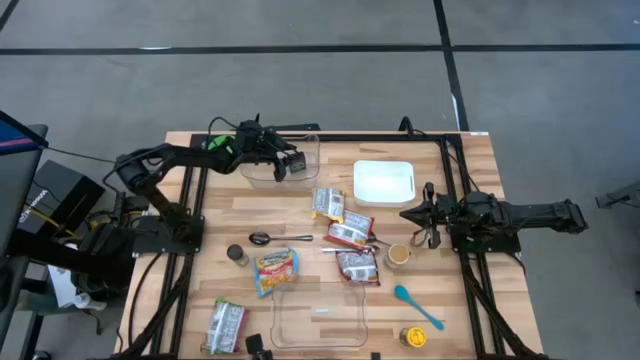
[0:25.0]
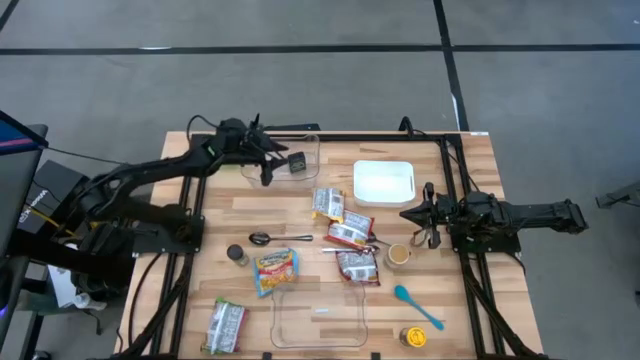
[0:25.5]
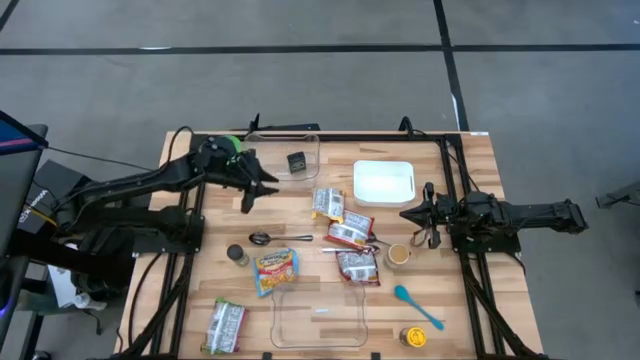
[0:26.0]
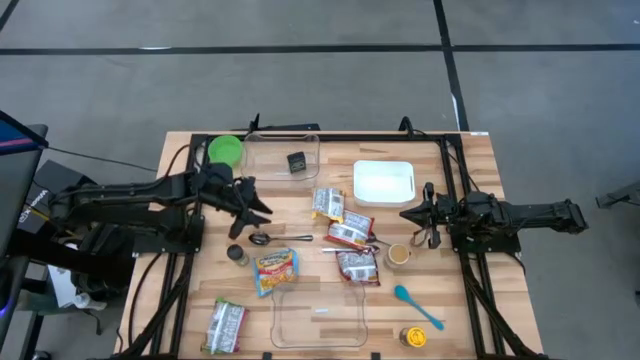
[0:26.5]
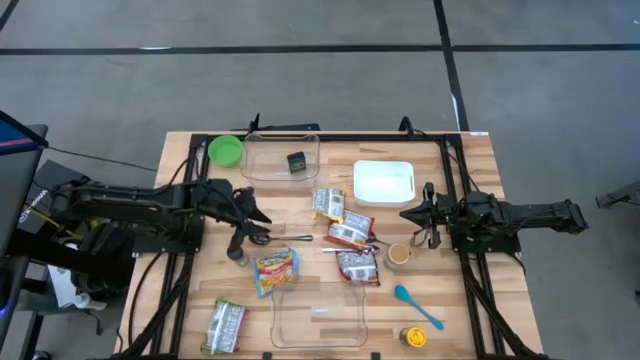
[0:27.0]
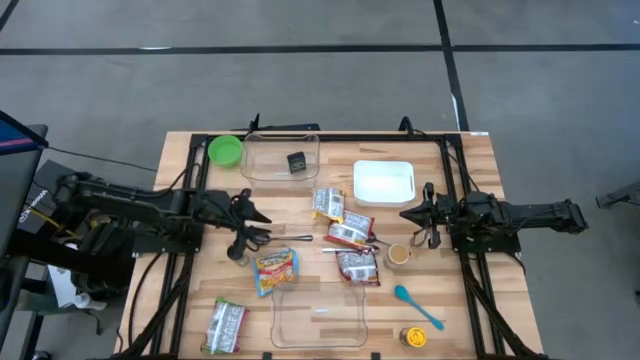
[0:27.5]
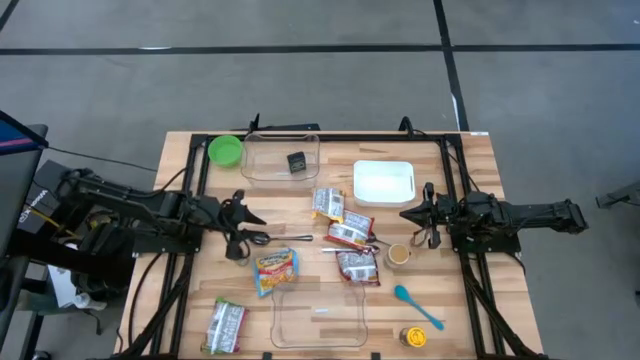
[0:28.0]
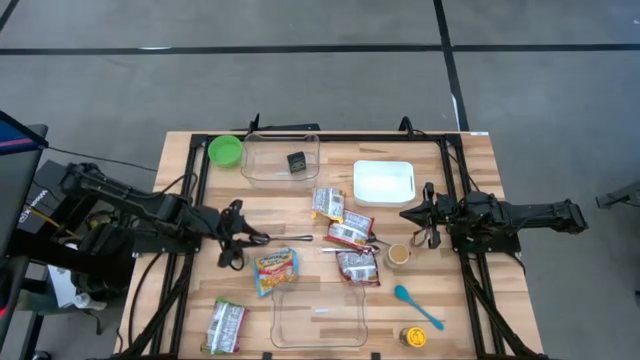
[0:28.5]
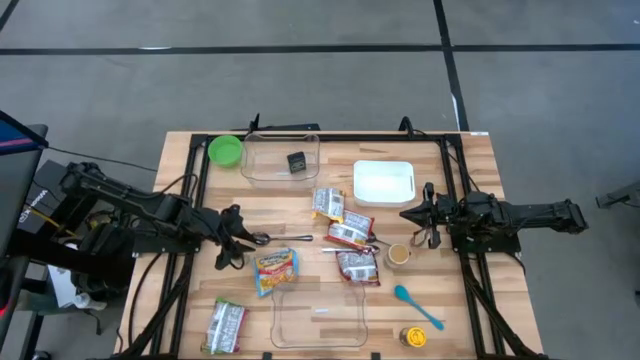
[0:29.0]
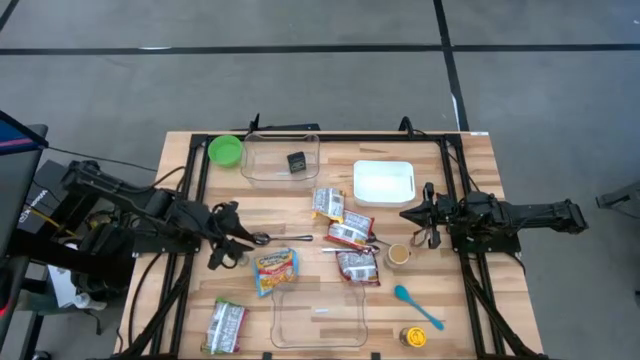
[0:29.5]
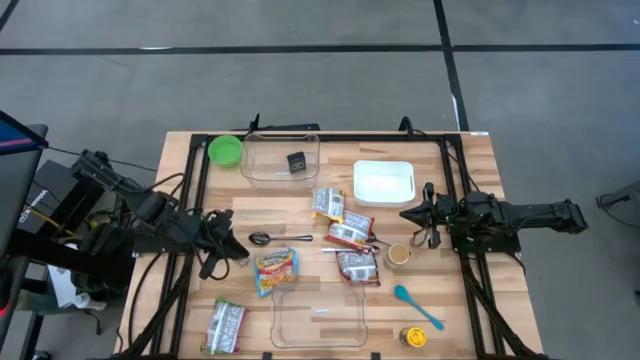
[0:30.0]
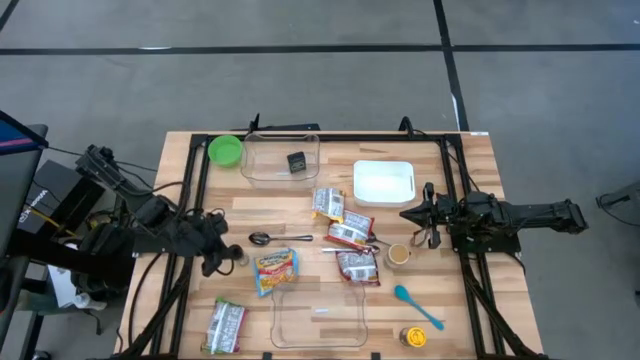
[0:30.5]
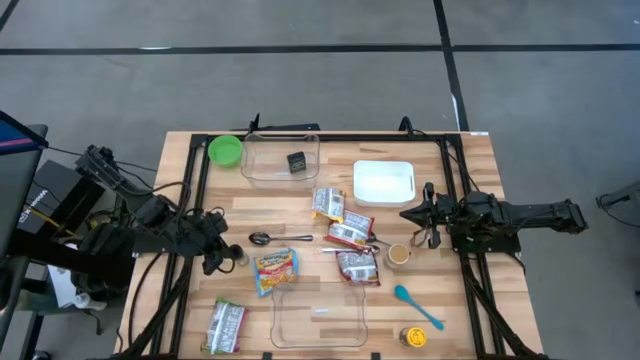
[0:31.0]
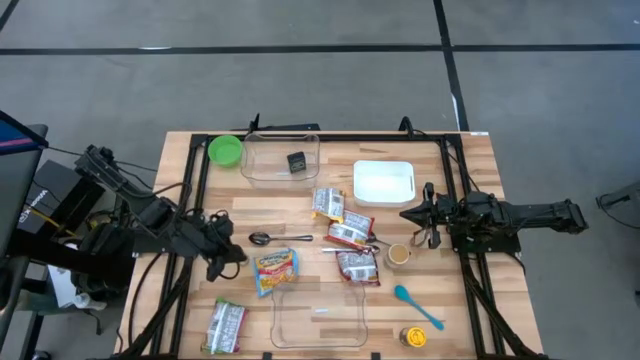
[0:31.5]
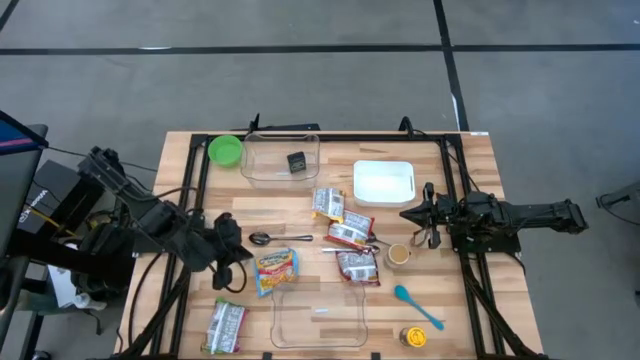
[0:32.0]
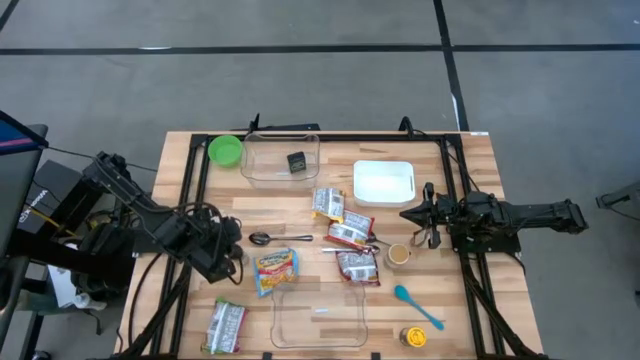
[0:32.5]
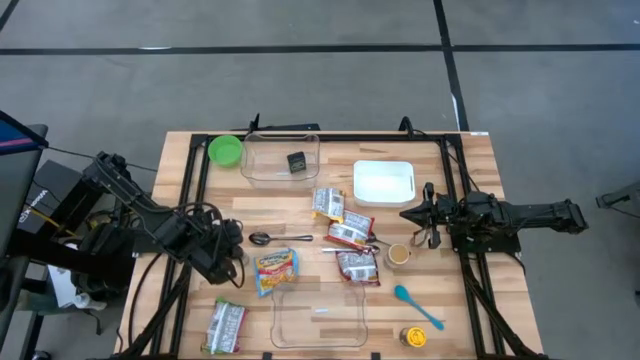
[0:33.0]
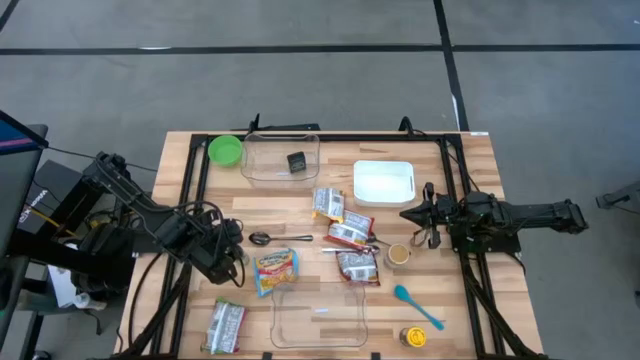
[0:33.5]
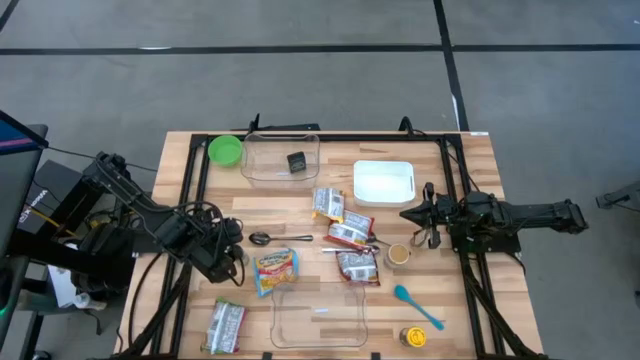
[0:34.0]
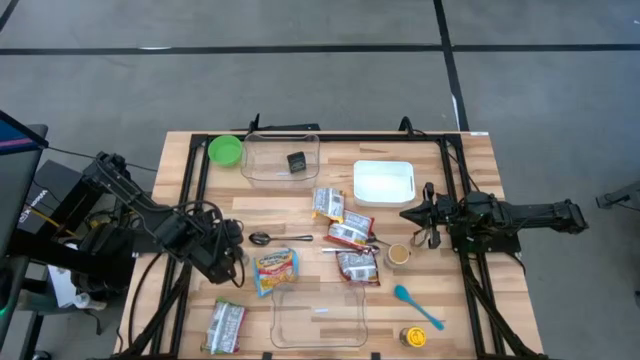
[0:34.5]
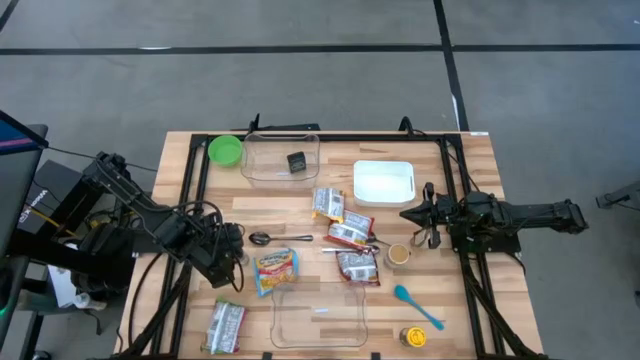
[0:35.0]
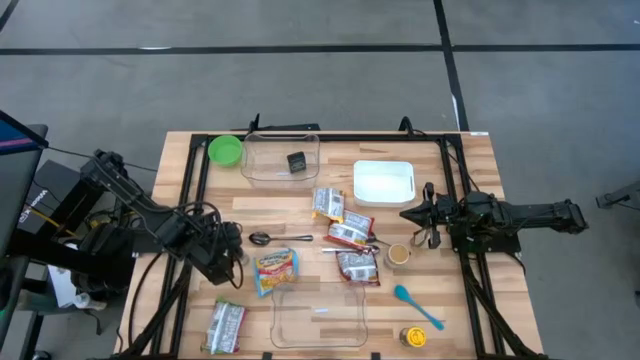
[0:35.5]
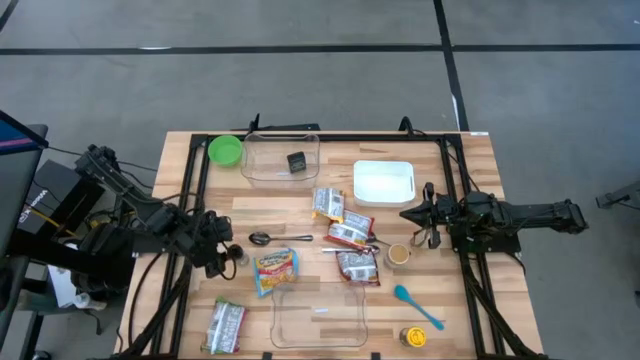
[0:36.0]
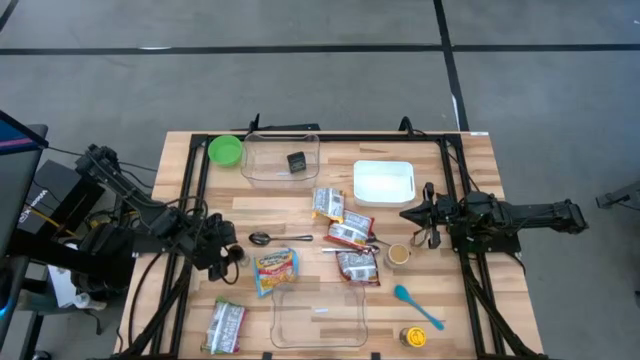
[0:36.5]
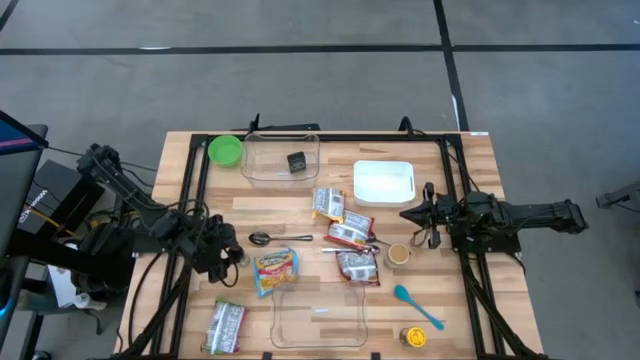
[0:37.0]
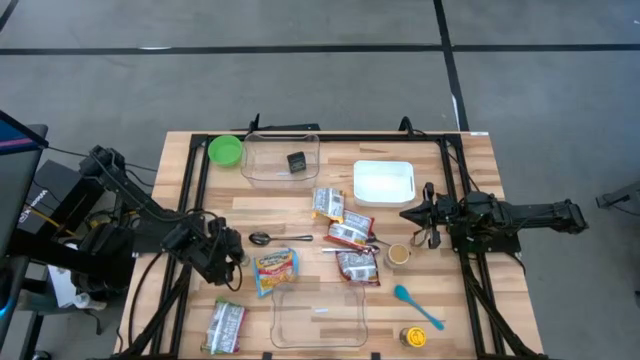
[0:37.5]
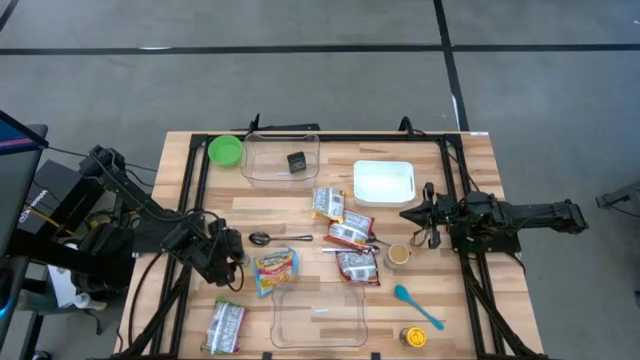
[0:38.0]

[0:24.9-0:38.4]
Task: Pick & Place Food Item
Put the green seasoning bottle into the top transparent bin

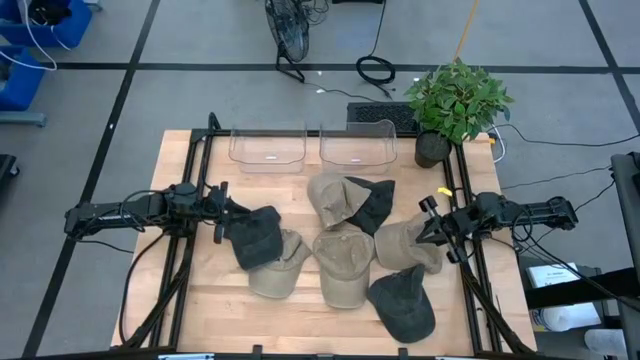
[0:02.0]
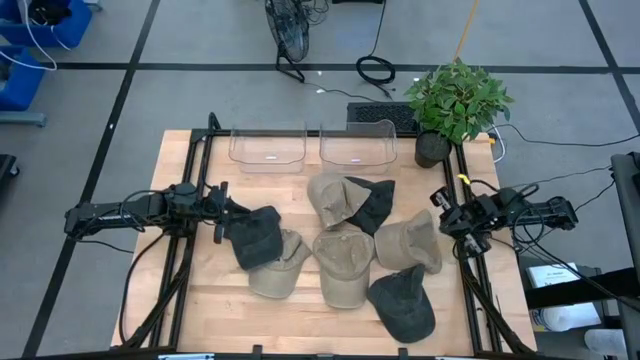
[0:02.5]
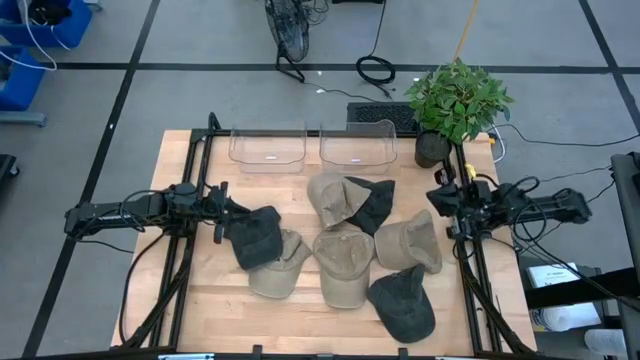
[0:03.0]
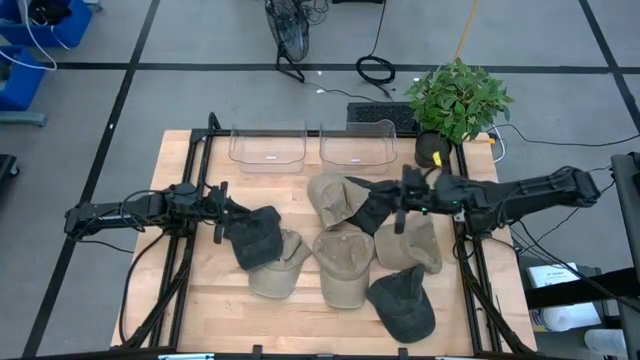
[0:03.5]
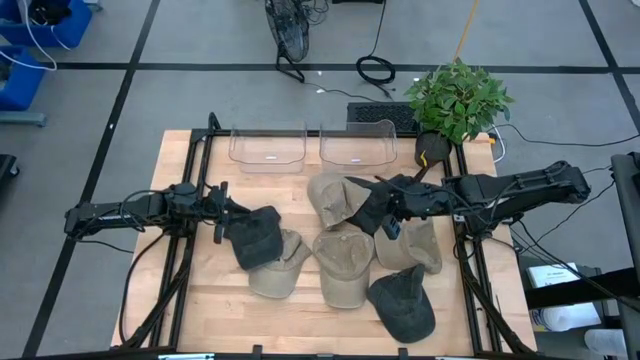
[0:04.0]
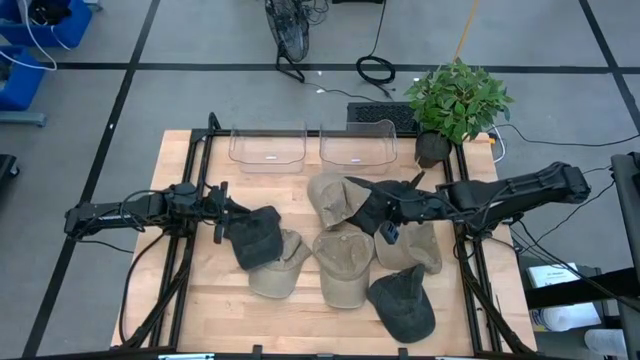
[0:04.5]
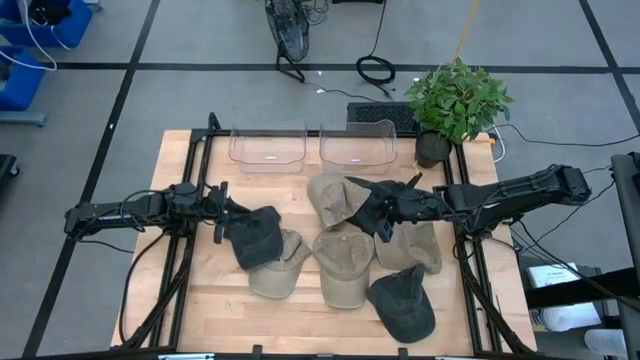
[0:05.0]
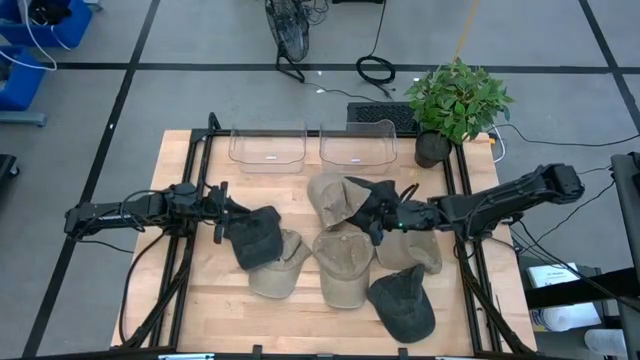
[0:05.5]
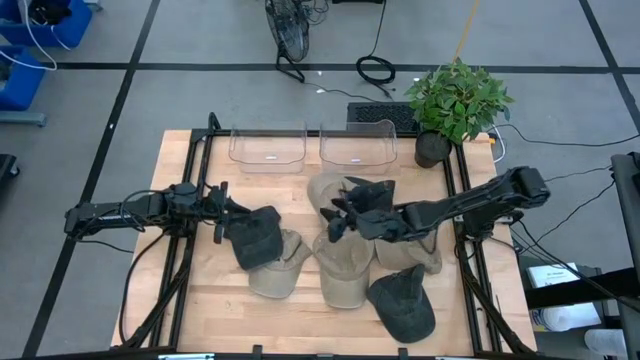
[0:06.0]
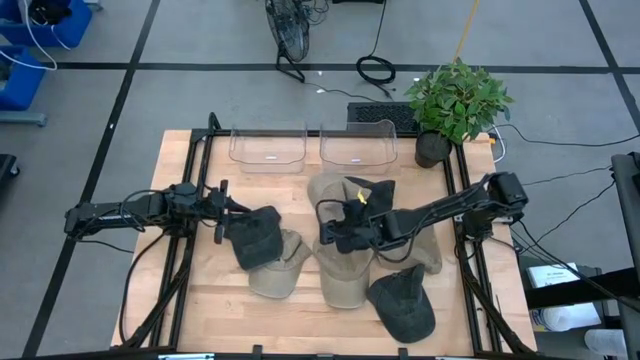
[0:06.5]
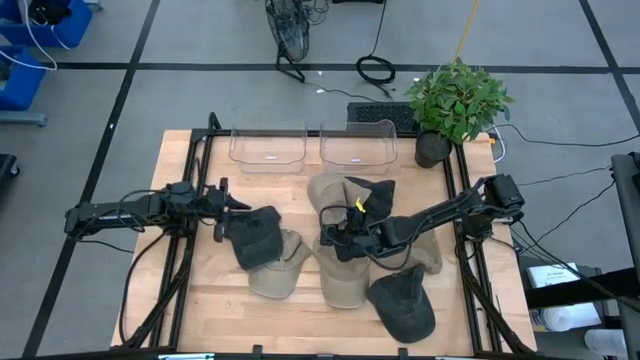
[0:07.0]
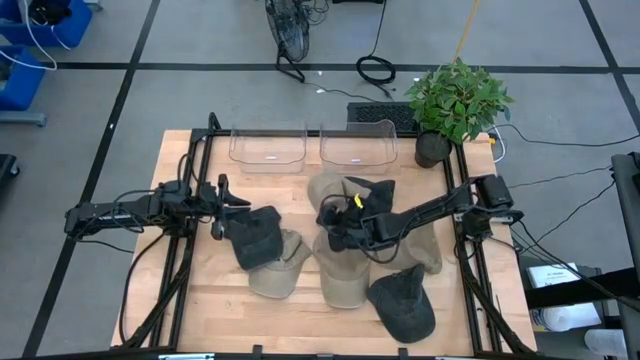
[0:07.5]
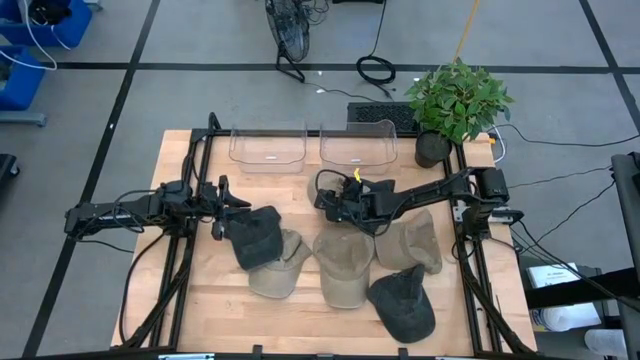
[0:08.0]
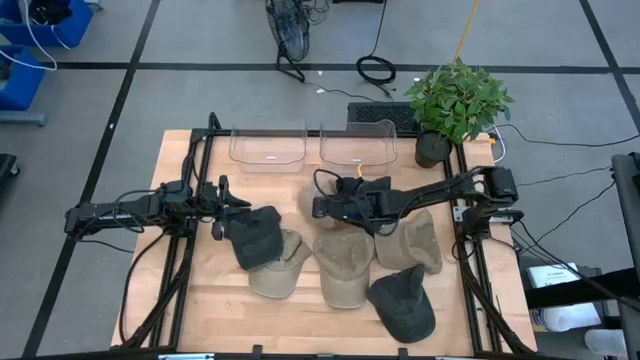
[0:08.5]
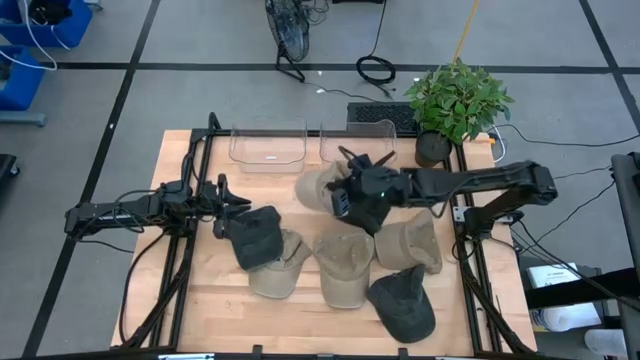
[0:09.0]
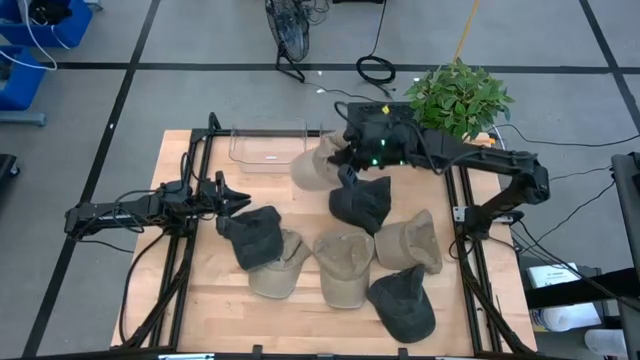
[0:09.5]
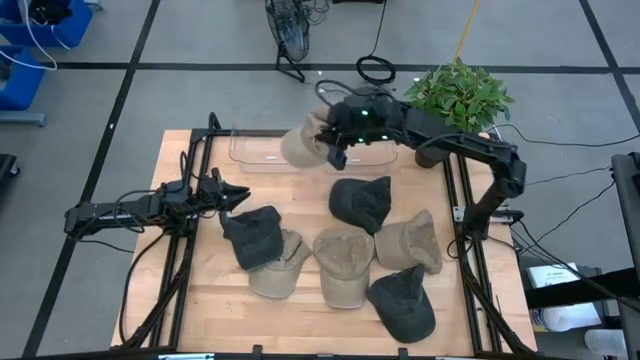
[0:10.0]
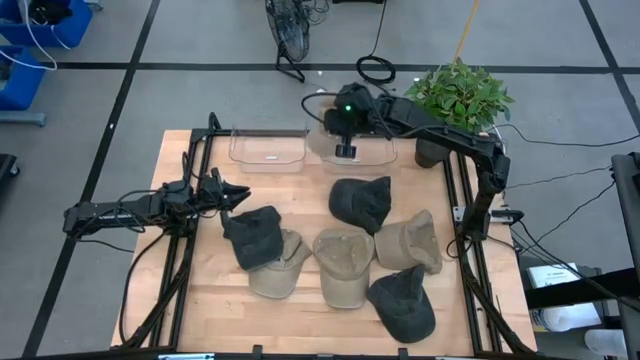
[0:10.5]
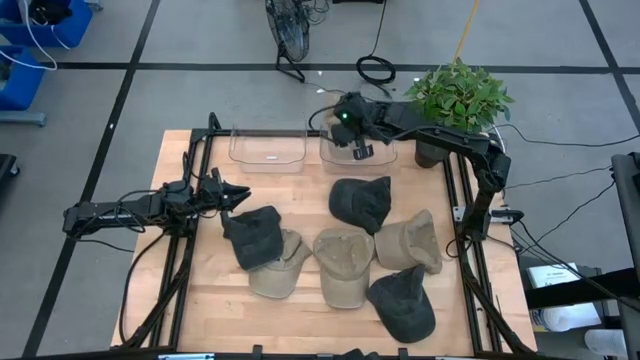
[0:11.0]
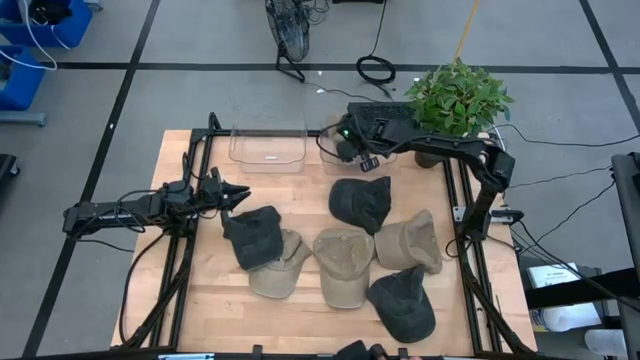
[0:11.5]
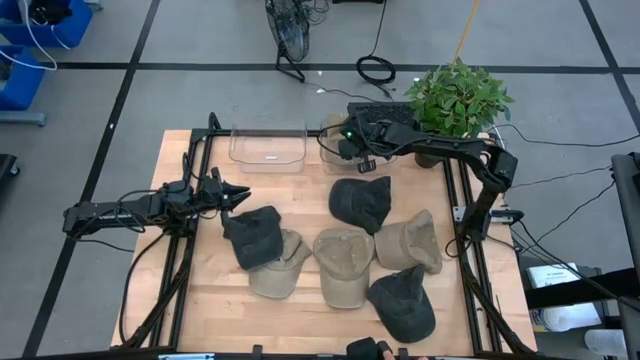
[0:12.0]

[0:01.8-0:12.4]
Task: Pick & Place hat
Put the brown cap into the right transparent bin
